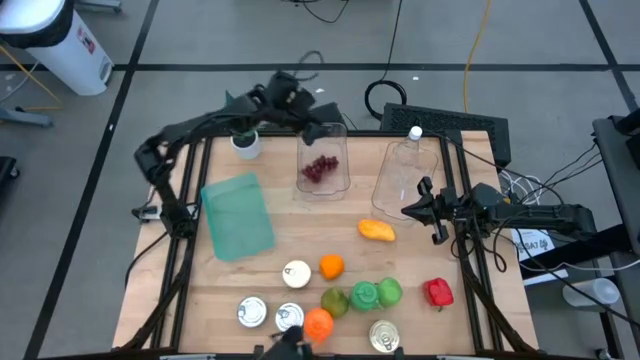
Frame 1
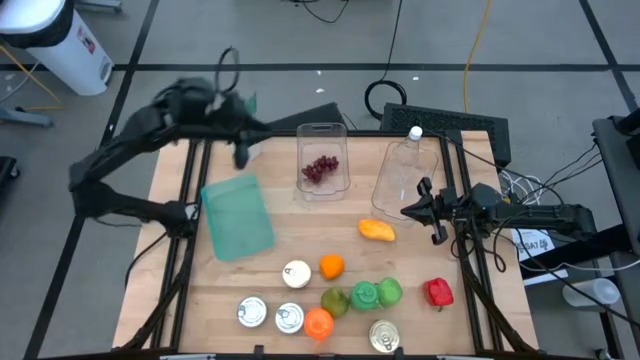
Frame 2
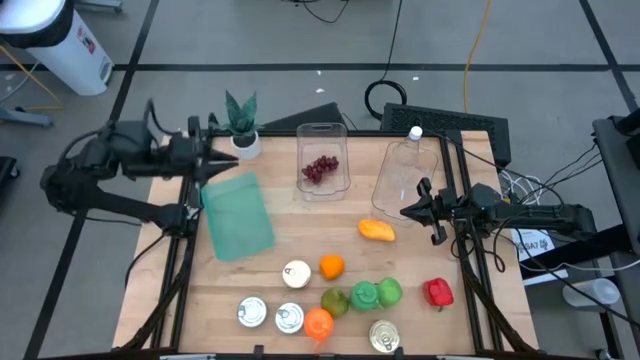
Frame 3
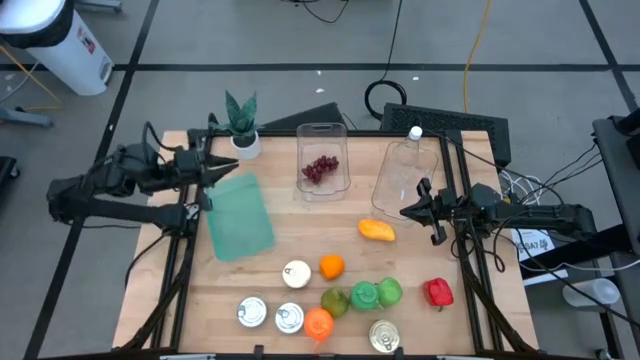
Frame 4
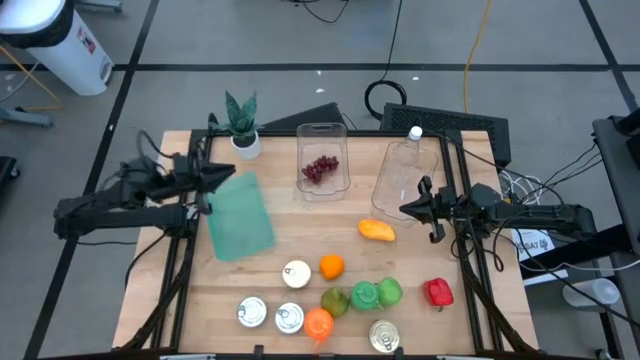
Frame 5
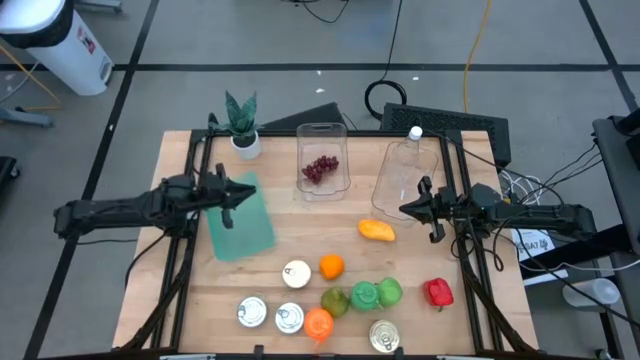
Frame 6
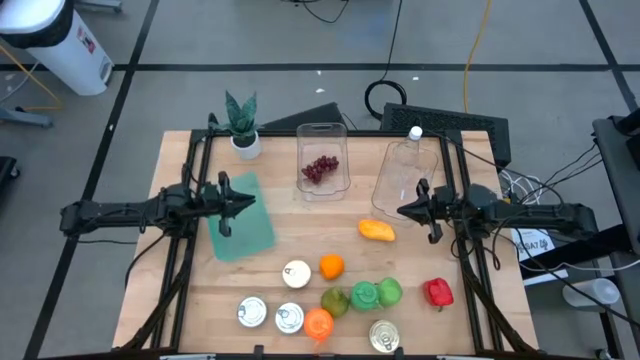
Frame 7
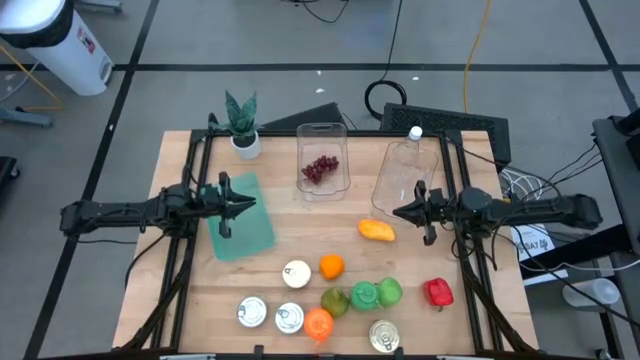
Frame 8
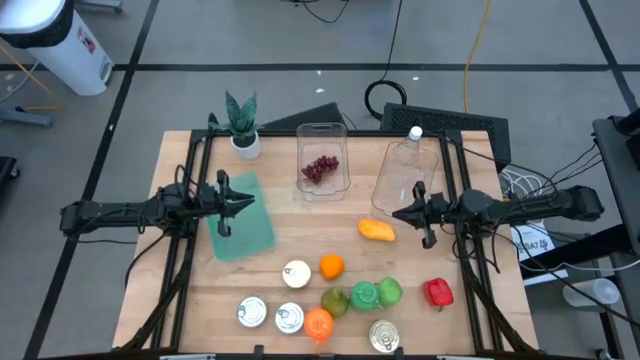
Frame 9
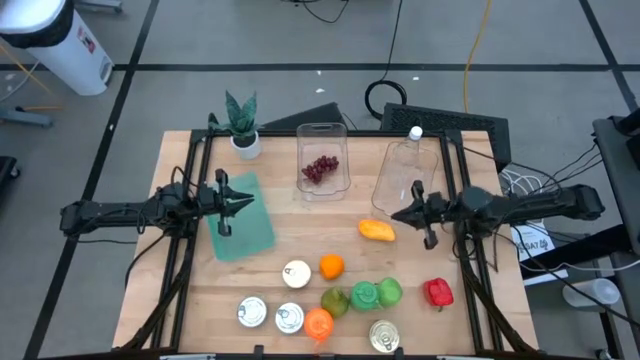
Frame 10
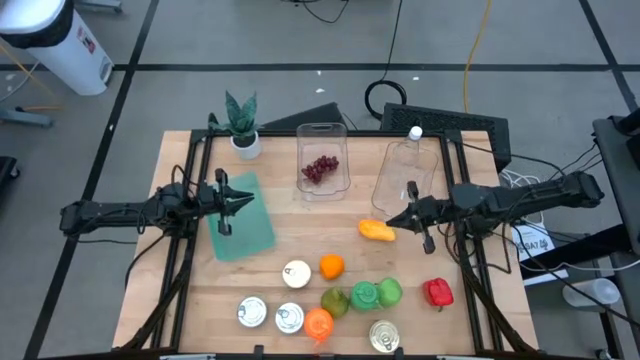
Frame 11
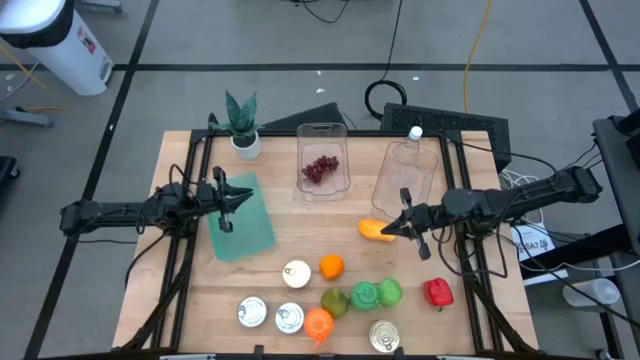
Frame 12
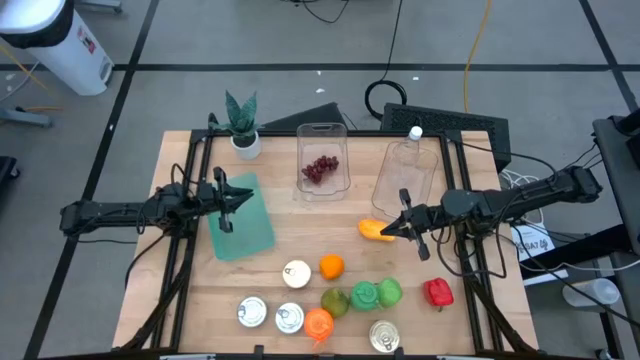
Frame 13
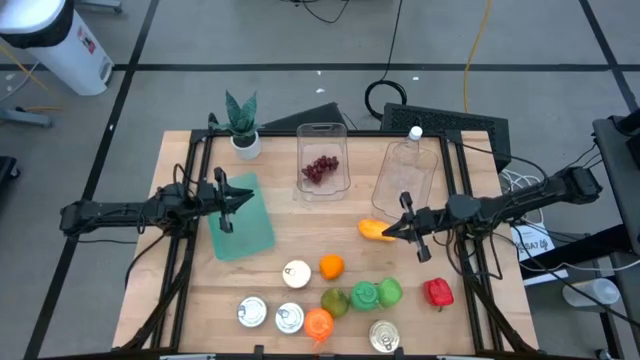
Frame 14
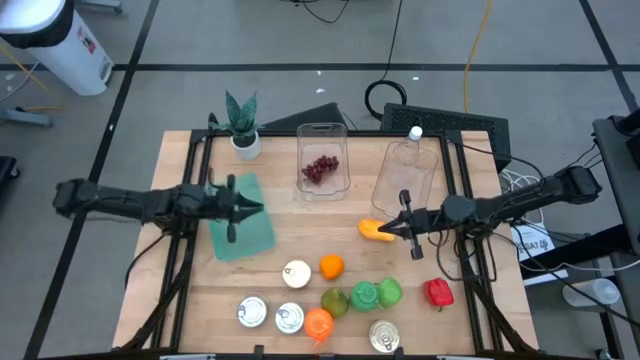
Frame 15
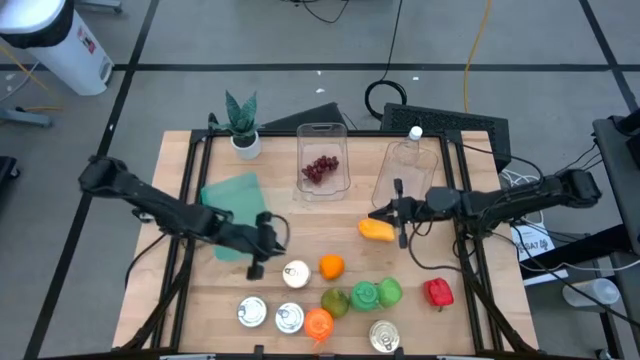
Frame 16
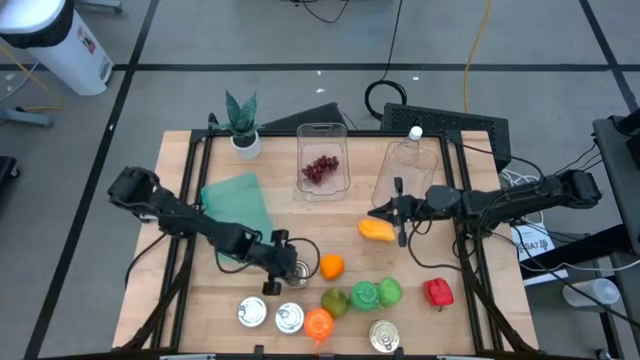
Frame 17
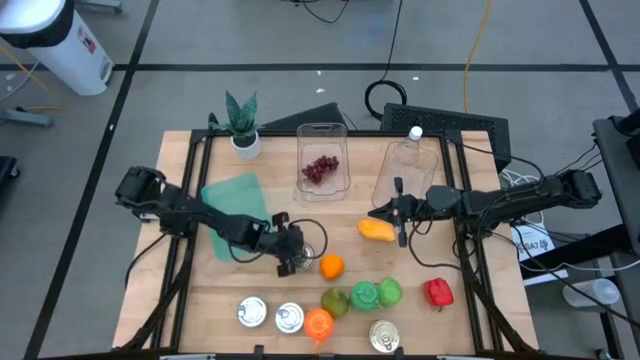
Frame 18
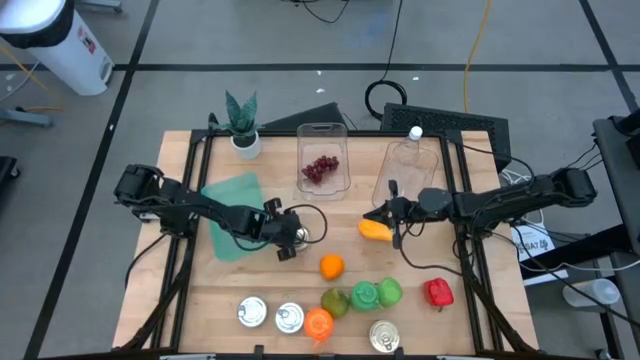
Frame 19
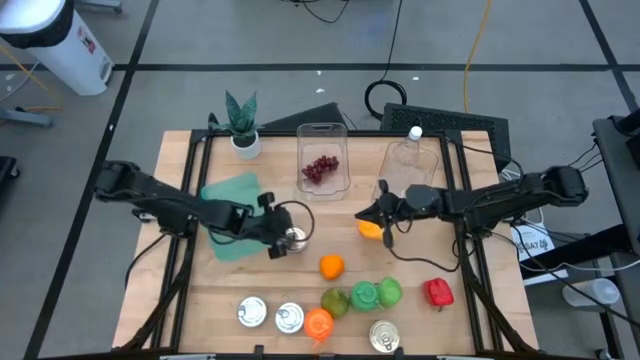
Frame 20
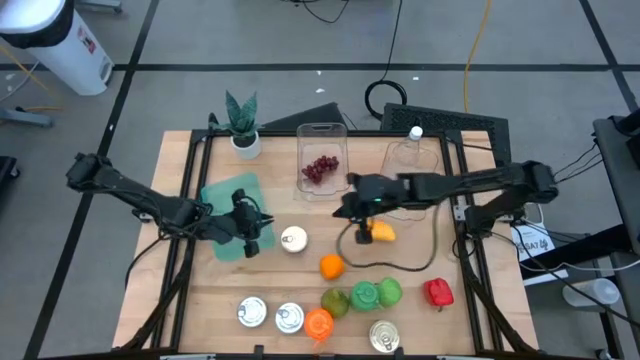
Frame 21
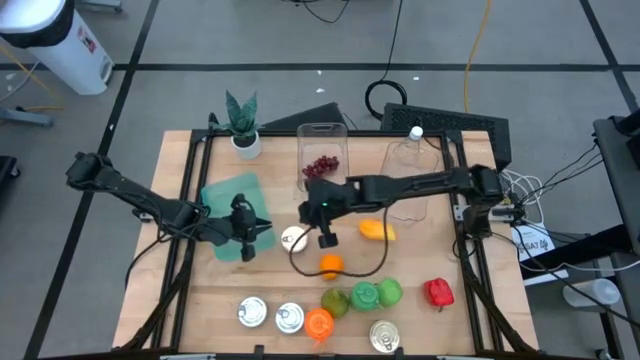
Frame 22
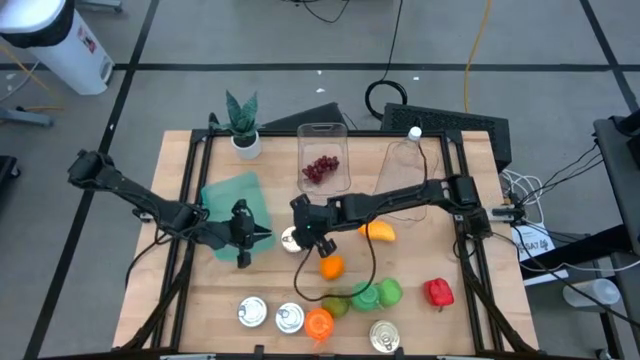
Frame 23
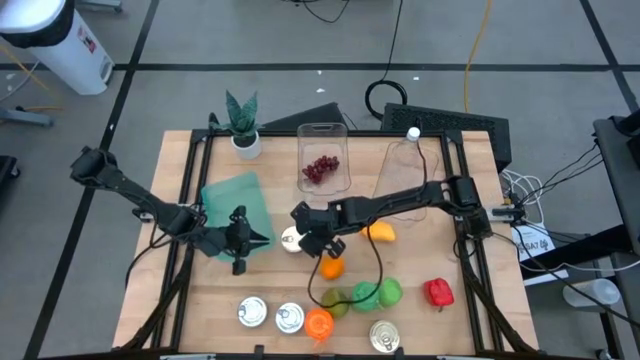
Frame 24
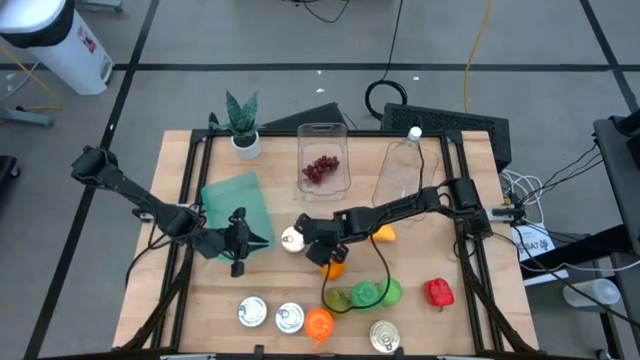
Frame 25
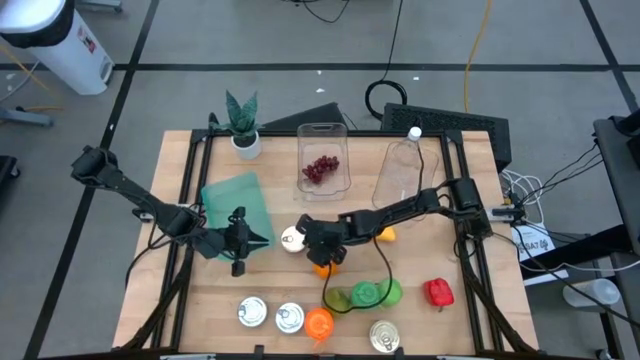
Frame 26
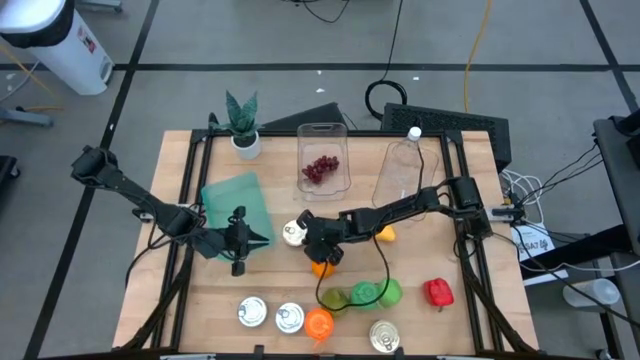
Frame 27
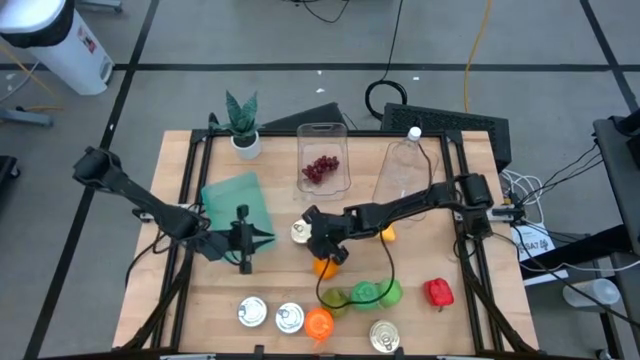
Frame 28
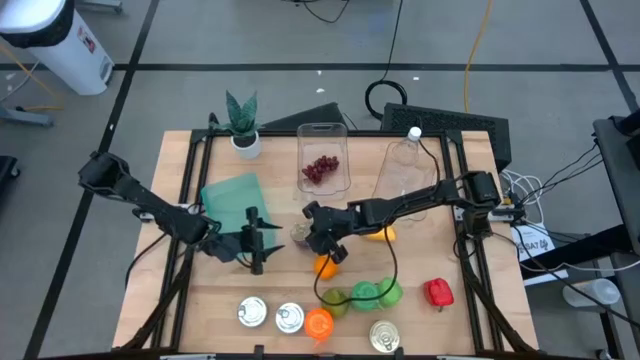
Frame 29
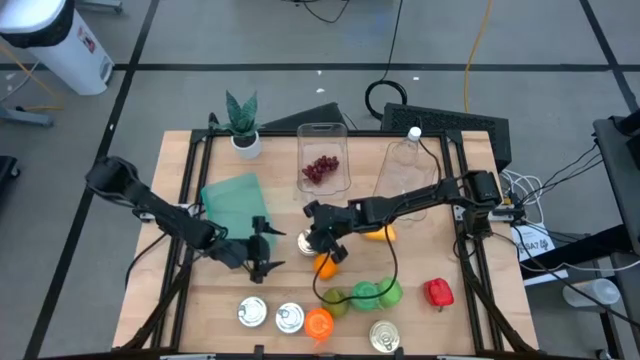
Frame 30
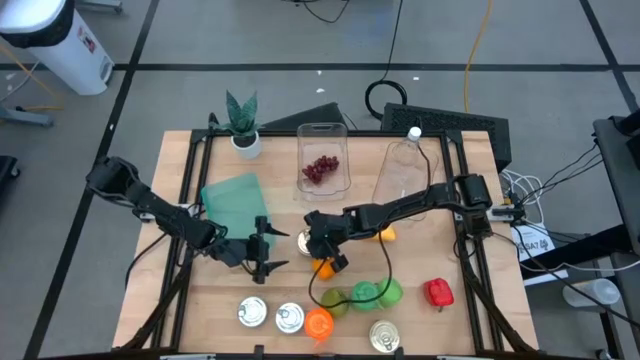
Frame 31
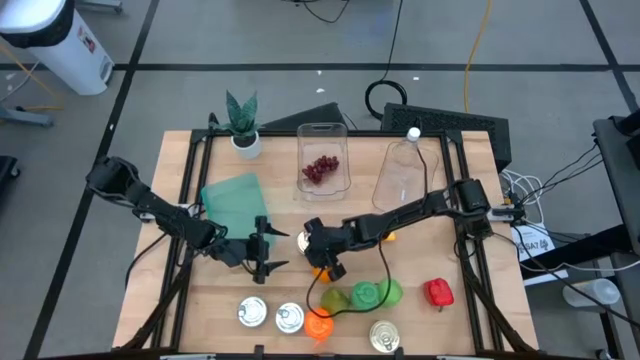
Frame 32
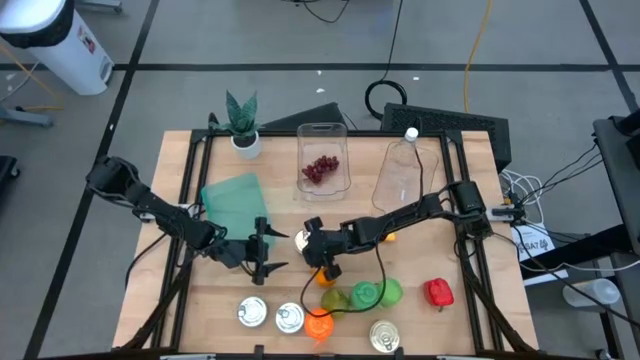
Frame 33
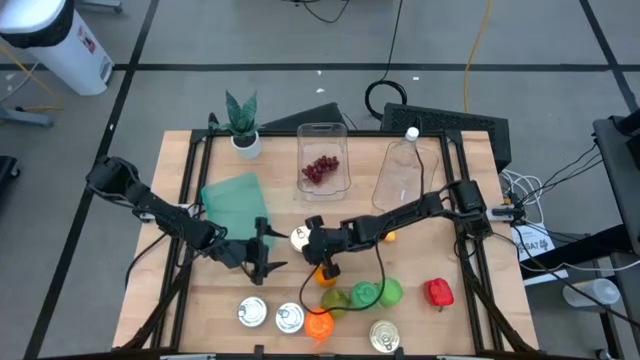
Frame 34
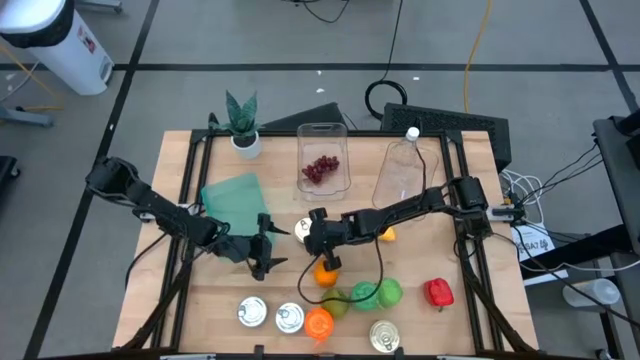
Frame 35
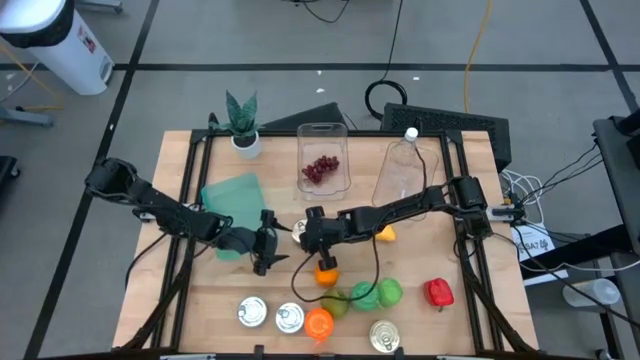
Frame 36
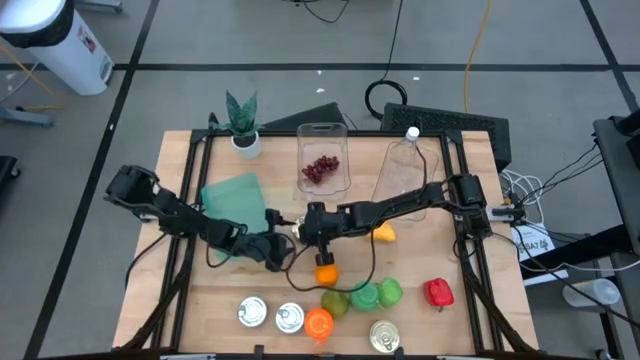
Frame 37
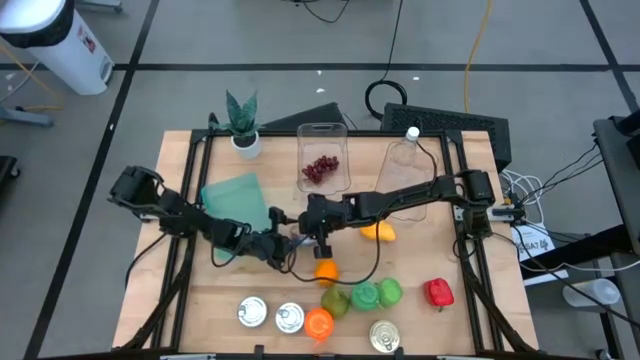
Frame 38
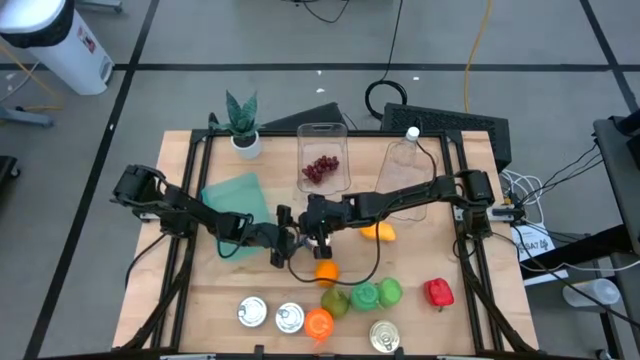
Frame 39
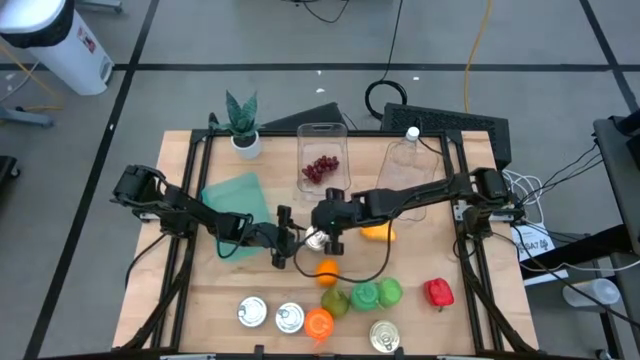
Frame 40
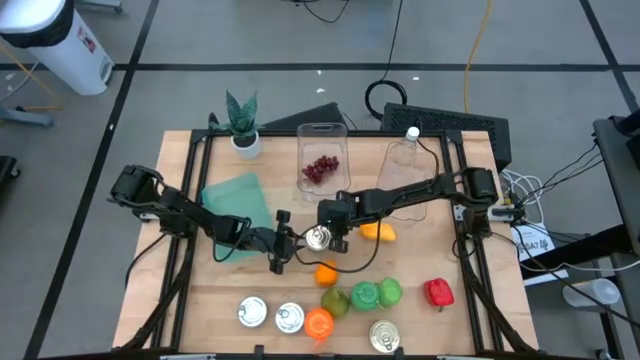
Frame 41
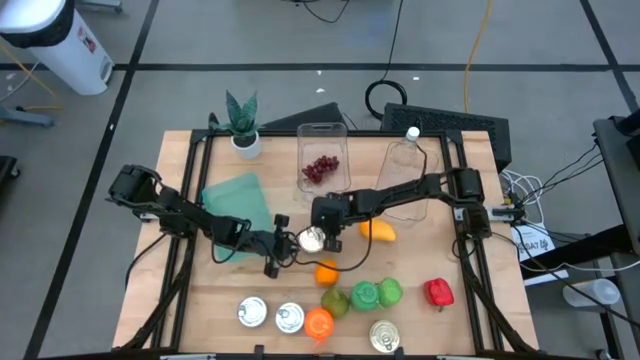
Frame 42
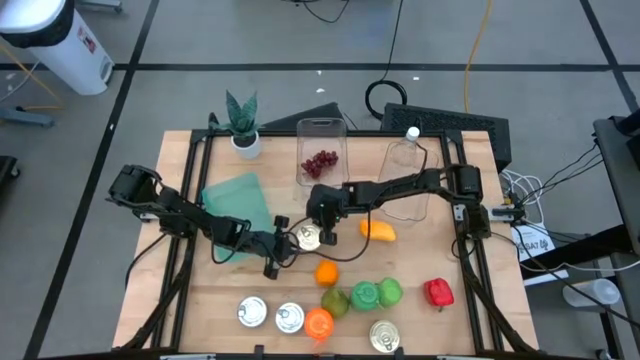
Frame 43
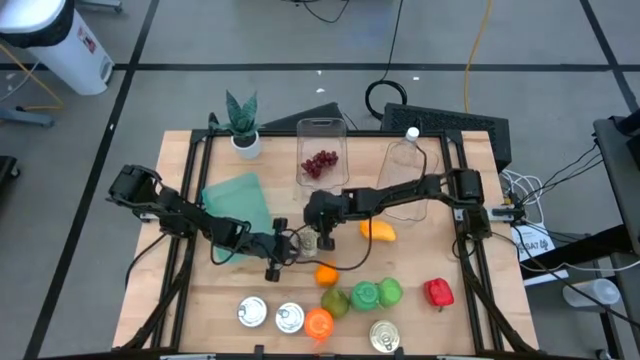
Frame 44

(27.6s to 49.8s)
Task: Pick & Place Food Item
Put the top left blue and pink tuna can into the blue bin
